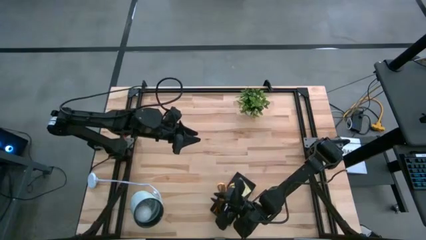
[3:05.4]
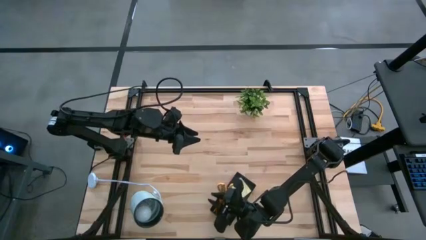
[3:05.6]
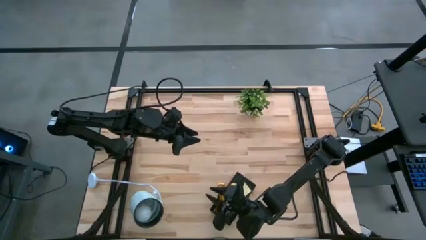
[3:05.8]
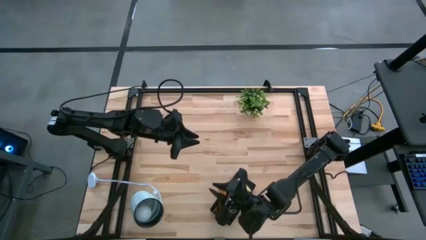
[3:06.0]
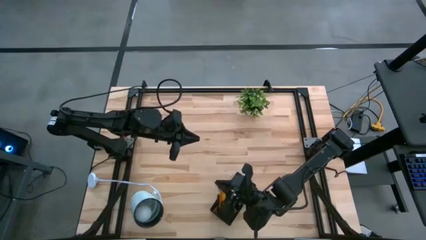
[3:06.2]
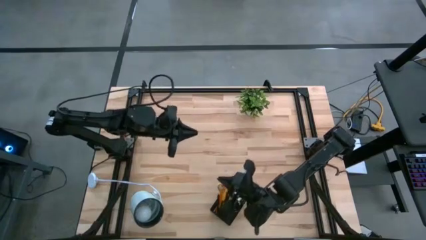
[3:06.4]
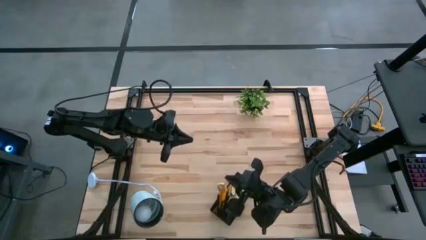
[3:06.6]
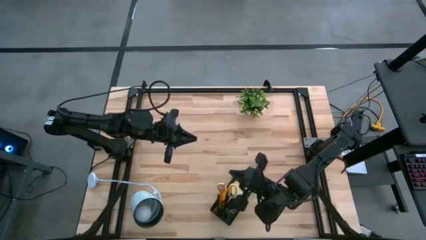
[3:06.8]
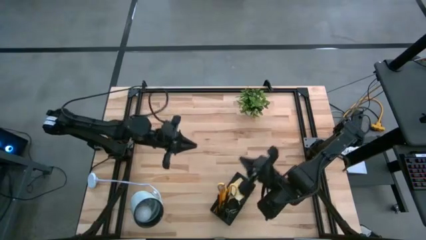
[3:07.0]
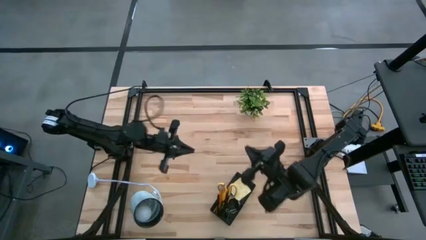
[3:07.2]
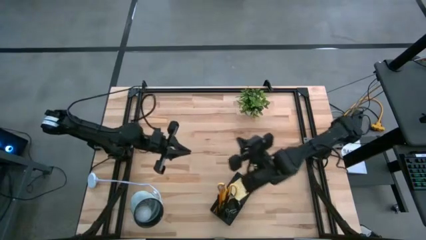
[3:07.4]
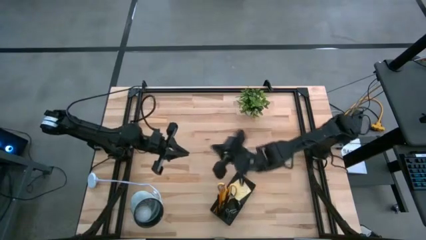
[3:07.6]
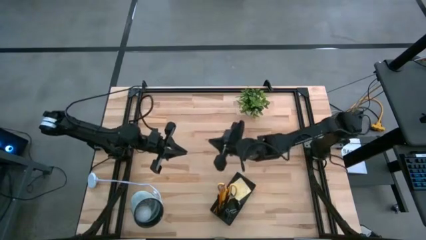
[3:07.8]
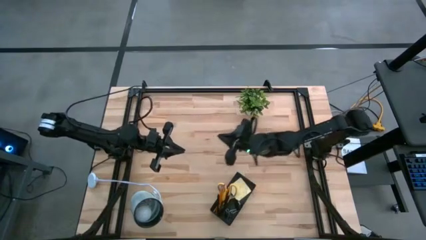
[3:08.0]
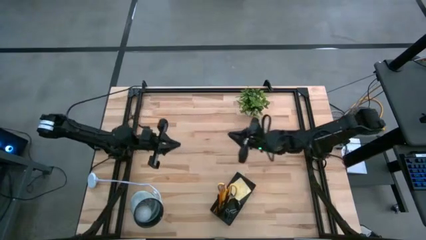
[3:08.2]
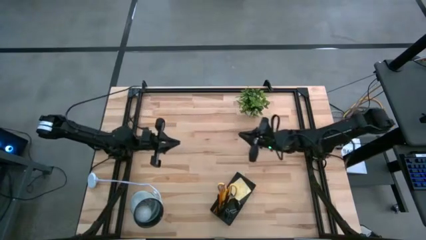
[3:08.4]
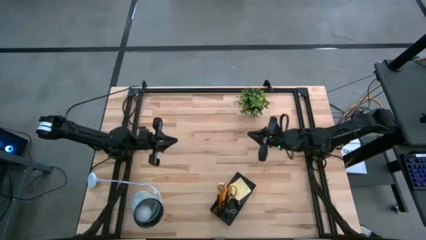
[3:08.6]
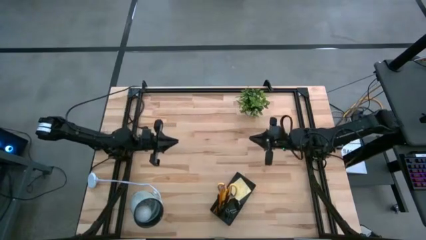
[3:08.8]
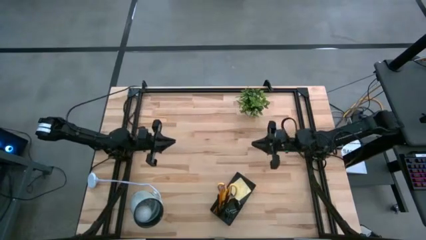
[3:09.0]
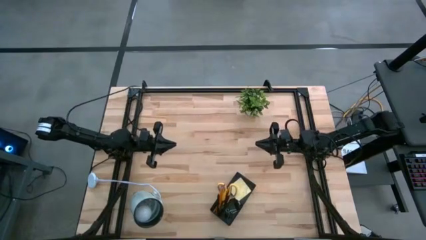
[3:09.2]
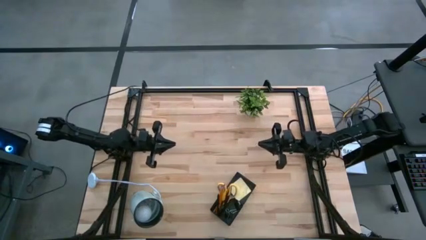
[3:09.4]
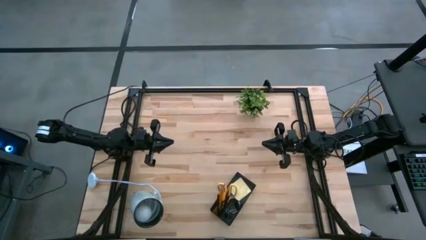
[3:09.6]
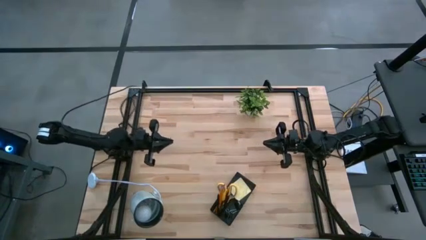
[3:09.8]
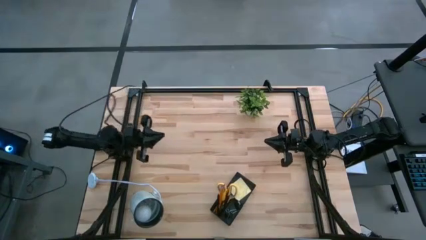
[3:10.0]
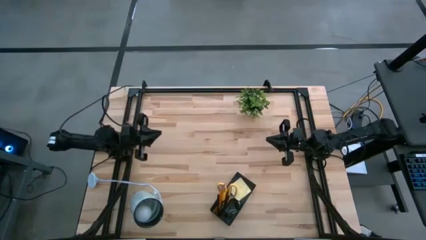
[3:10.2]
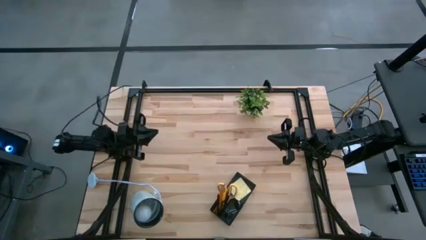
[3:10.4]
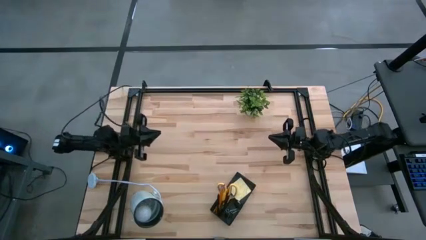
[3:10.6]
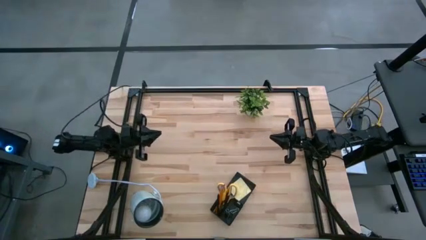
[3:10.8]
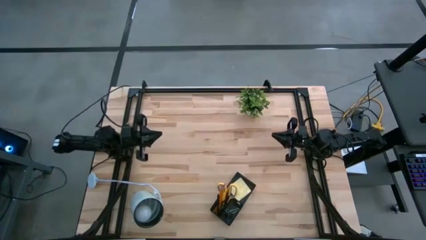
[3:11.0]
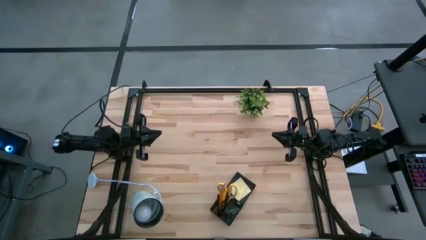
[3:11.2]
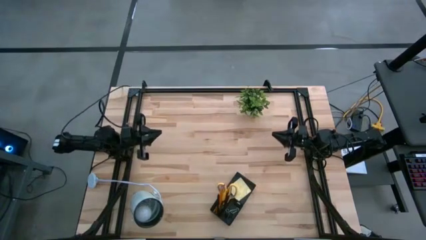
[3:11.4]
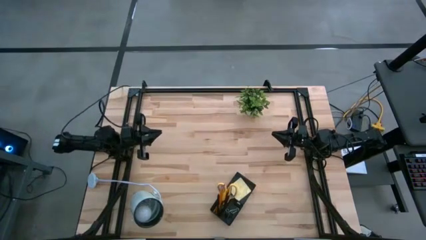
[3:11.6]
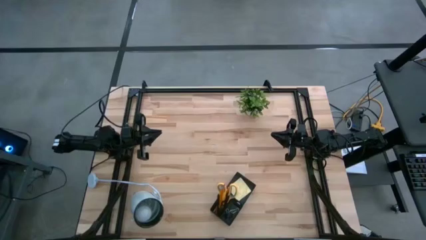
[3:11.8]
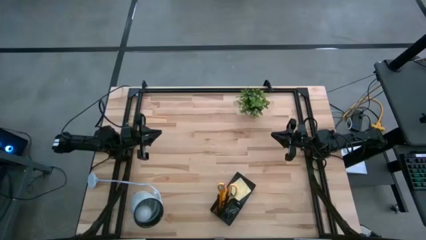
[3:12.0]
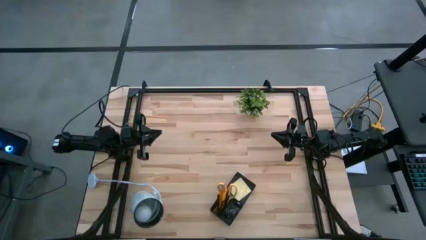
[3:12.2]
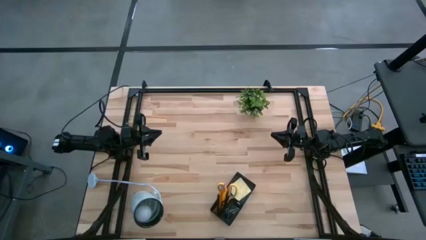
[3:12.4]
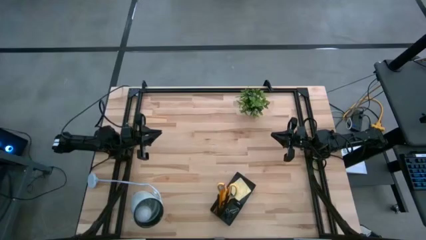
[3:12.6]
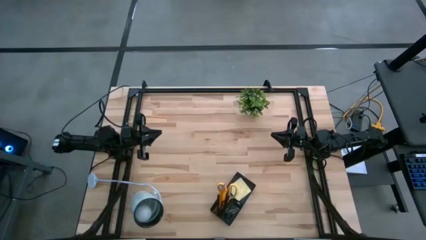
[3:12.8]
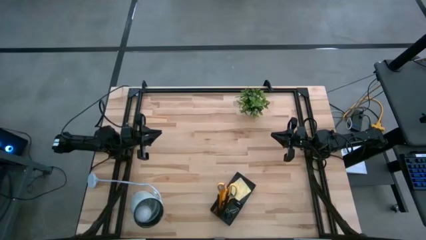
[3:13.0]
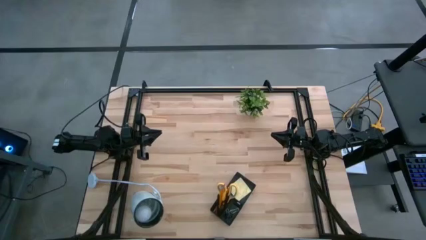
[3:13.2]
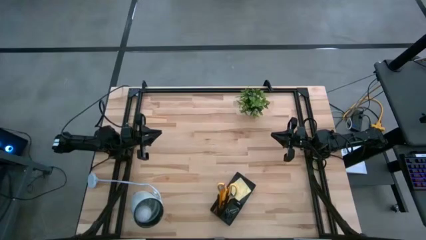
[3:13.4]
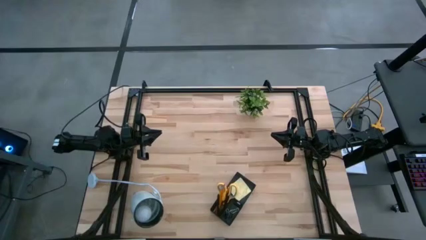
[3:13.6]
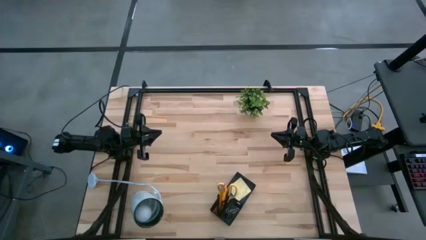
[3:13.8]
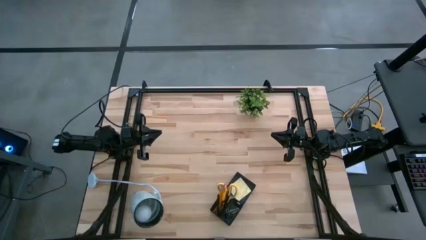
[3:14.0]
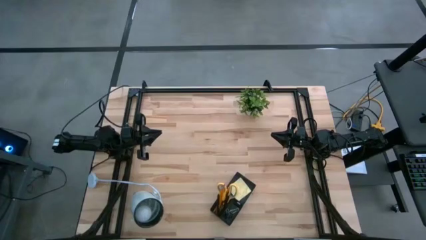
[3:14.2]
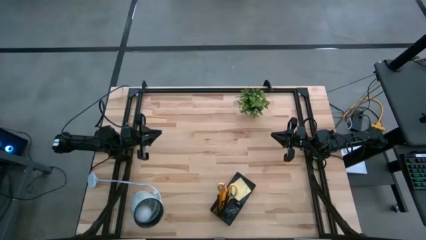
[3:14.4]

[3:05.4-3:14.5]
Task: Pick and place office supplies into organizer
Return to Home Position

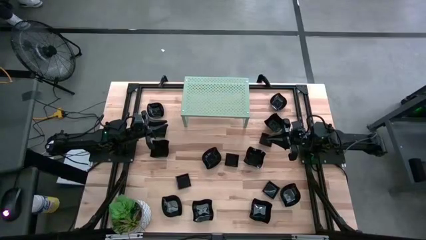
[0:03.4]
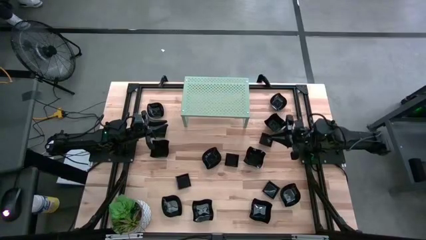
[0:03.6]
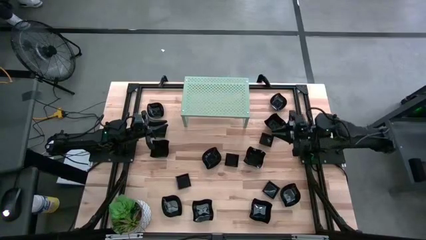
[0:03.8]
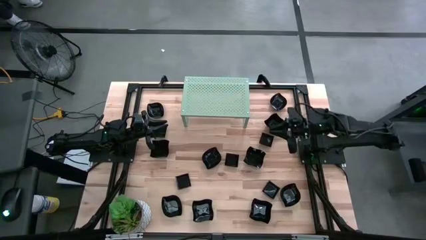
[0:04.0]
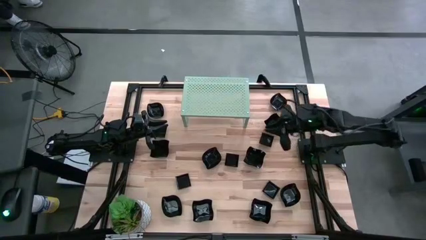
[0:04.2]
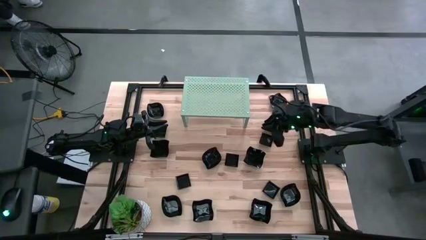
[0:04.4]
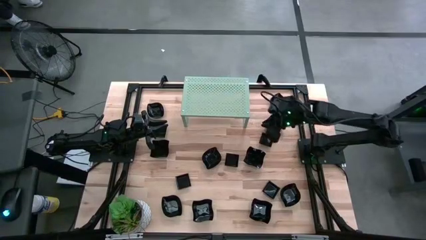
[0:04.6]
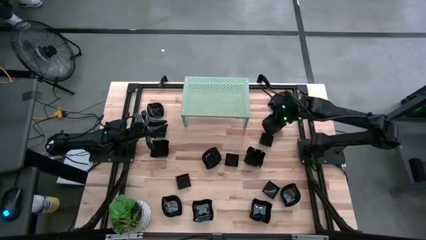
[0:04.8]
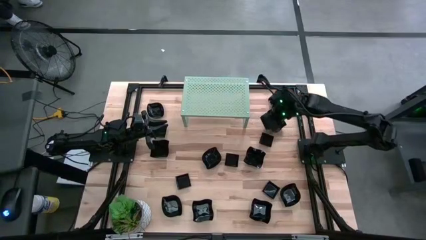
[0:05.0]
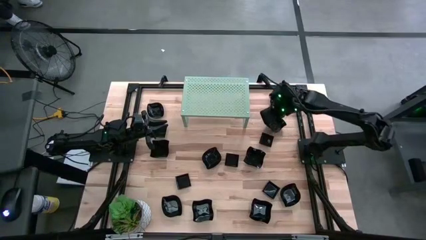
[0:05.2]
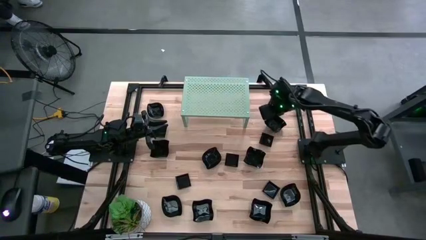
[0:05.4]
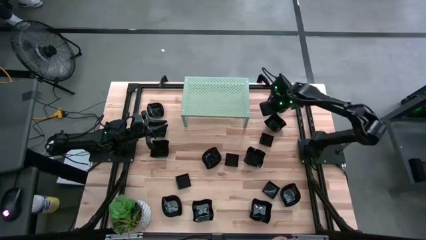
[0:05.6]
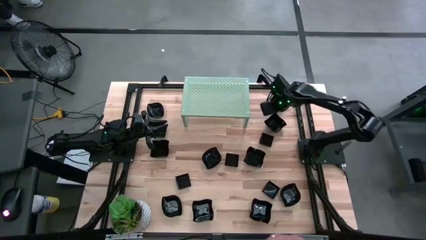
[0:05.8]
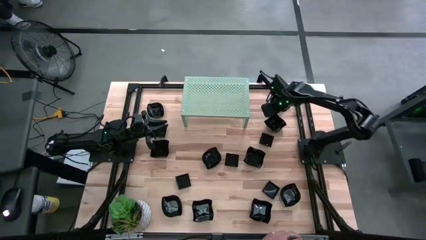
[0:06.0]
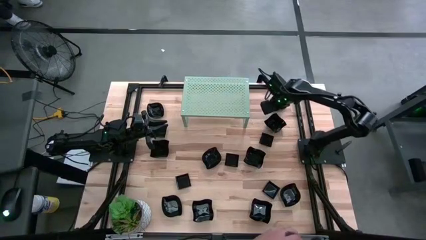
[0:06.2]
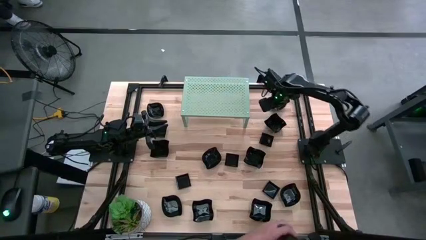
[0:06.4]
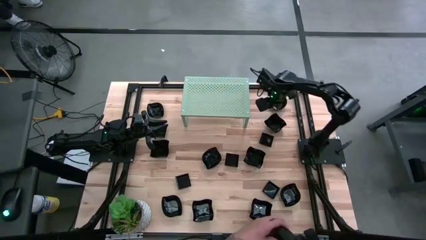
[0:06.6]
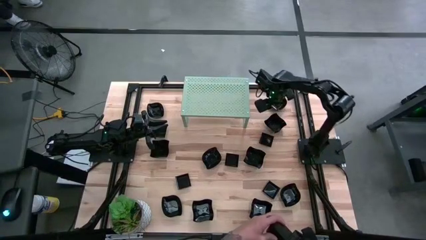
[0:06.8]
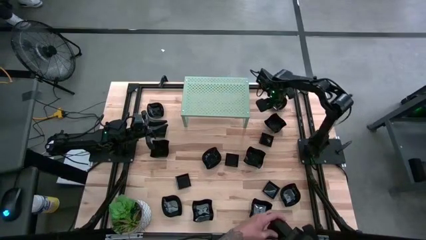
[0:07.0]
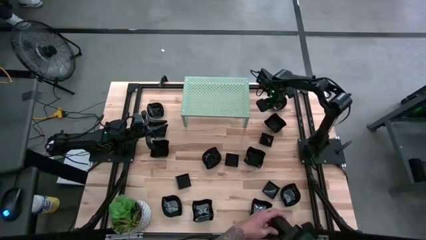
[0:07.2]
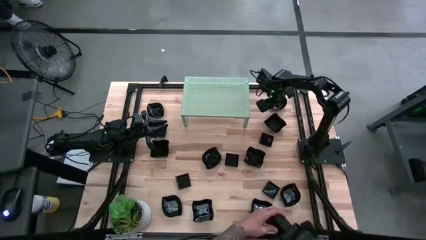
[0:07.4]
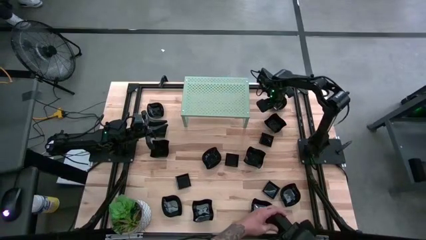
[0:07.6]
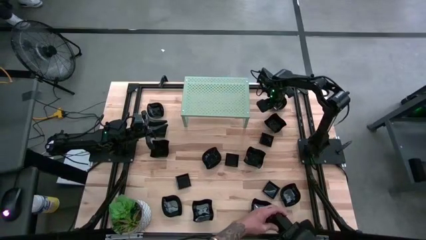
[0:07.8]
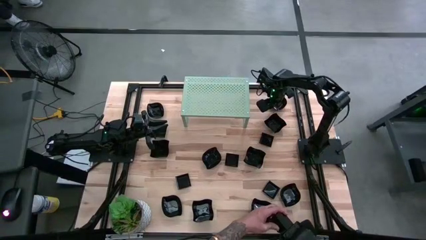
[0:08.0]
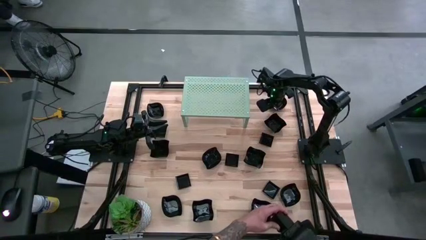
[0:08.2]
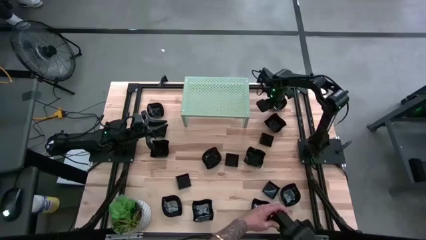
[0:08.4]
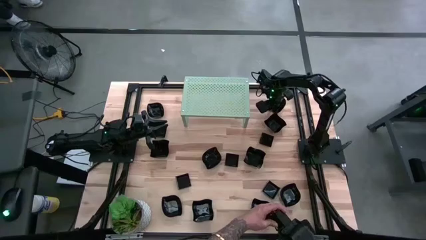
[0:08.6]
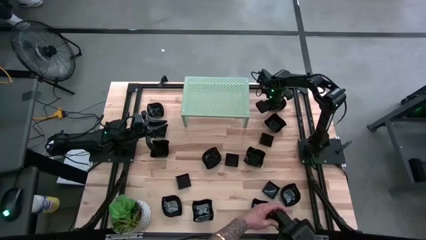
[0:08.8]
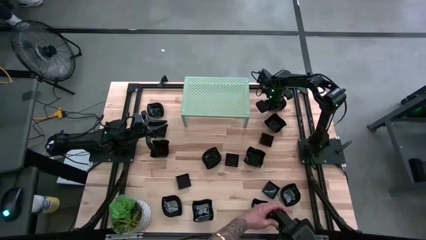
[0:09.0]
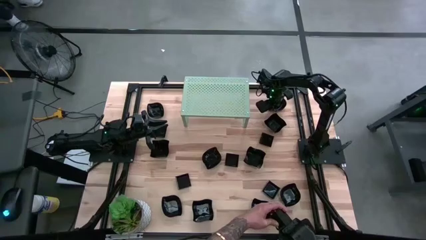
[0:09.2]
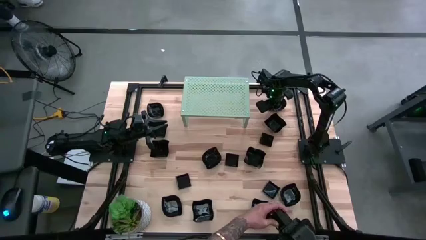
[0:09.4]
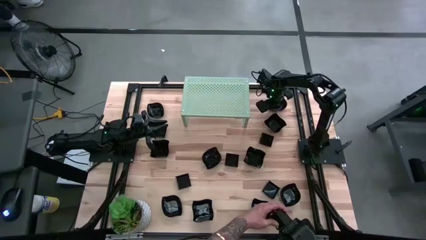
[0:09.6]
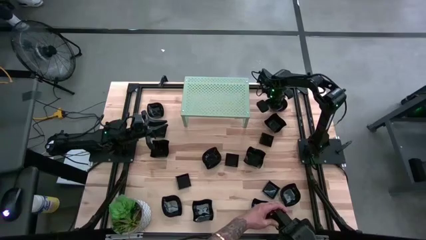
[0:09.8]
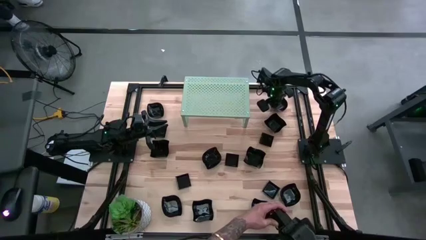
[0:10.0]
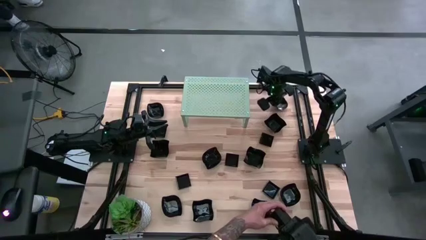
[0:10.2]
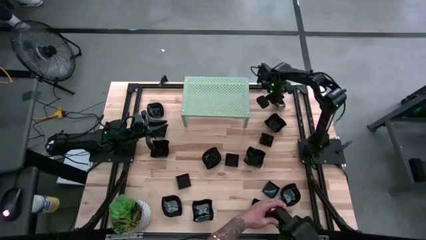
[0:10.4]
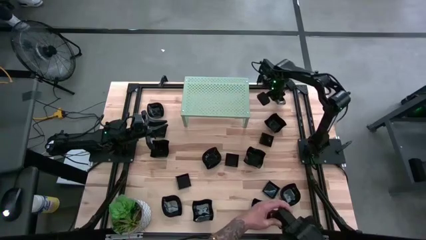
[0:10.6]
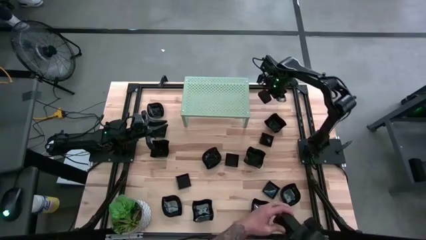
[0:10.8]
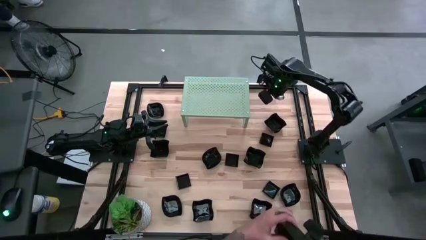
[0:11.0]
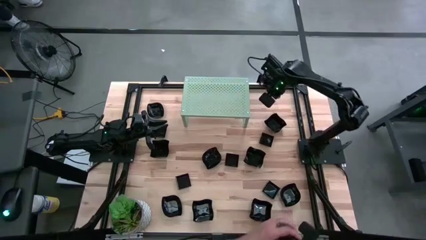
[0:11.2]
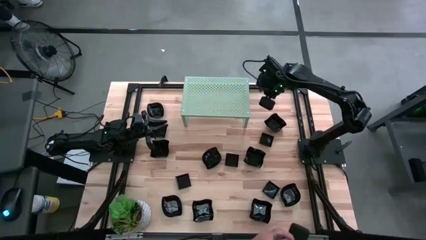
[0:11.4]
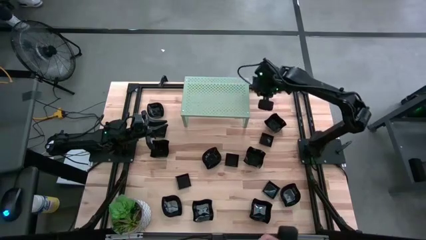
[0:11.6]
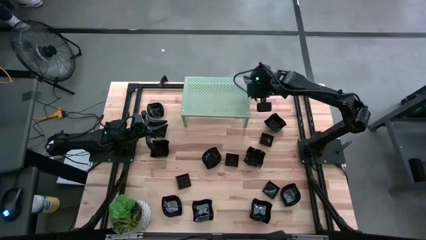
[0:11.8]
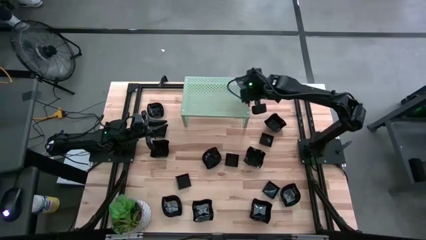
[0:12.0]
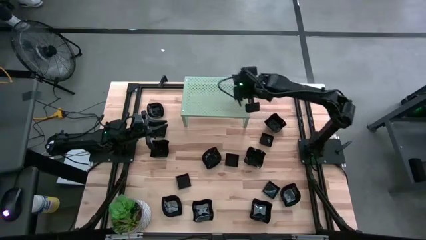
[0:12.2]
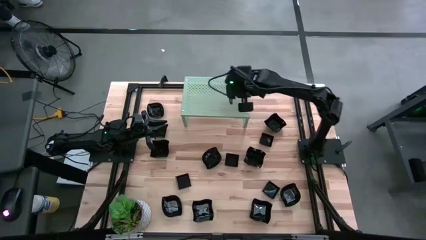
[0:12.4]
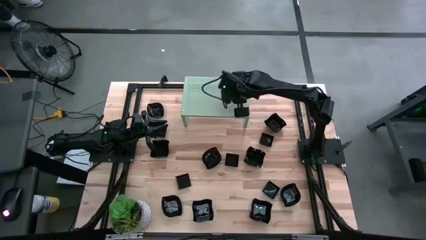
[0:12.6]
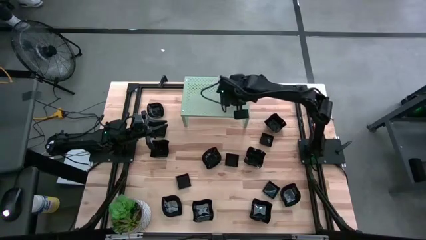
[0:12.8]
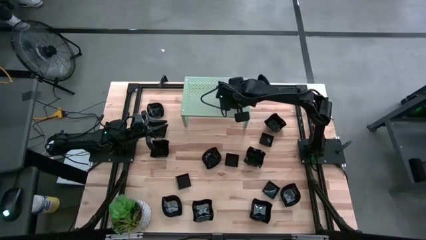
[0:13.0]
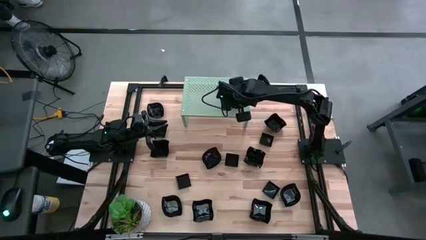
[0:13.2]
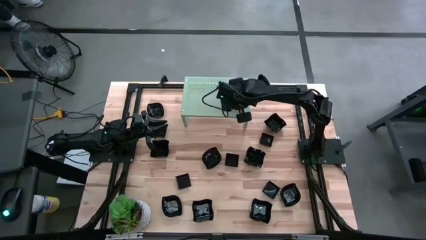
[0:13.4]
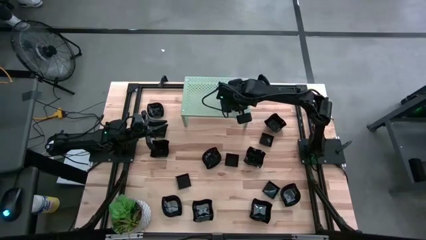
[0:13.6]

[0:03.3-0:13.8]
Task: Pick & Place Mini shaped plates
Put the leaf shaped plate on the shelf
